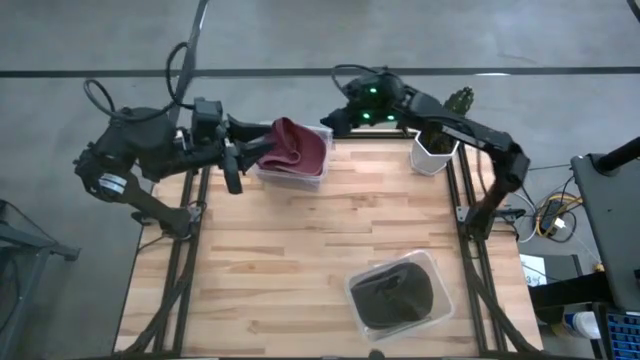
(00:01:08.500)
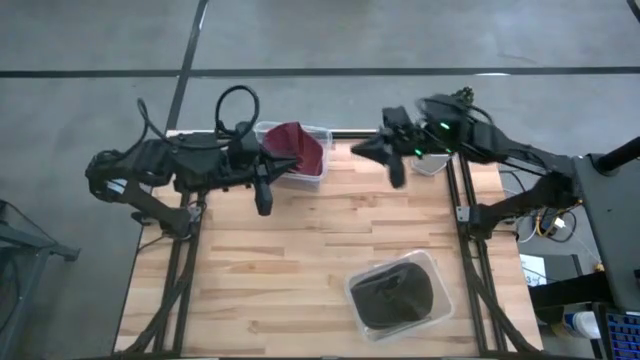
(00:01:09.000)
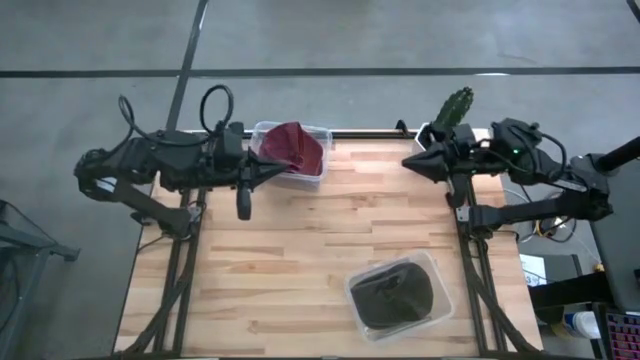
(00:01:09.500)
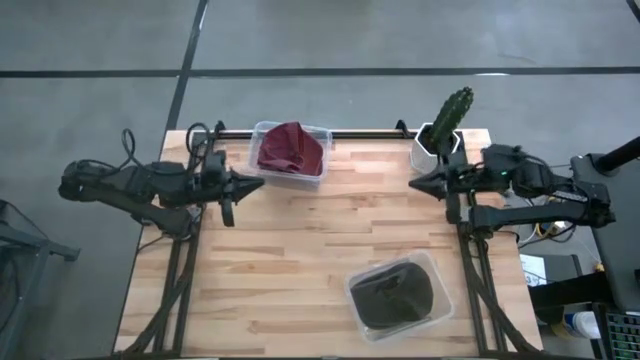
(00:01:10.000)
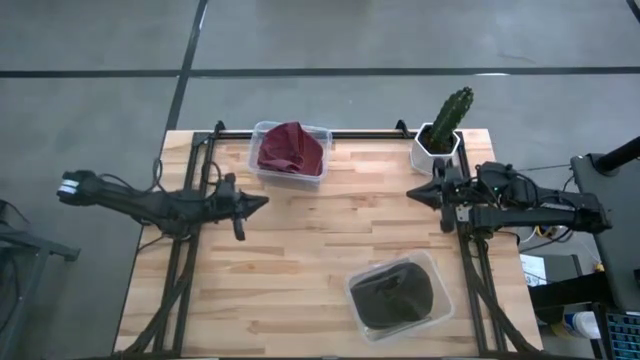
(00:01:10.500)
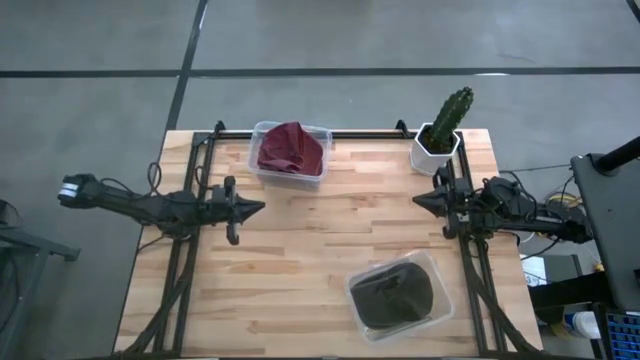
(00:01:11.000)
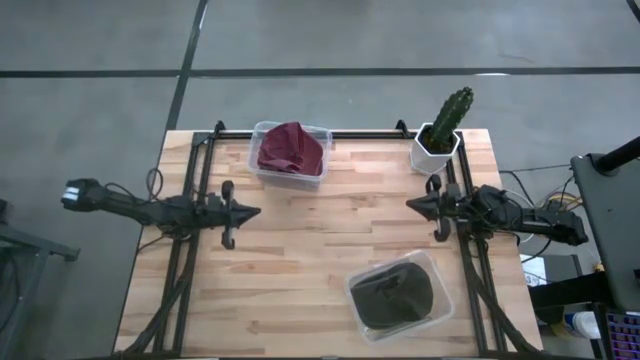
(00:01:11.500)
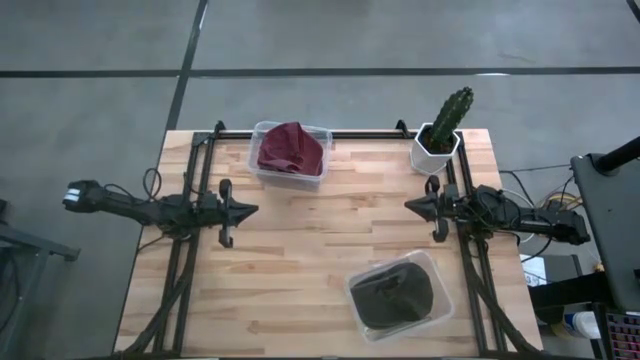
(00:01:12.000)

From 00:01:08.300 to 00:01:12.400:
Task: Pick and place caps into container
Return to Home Position

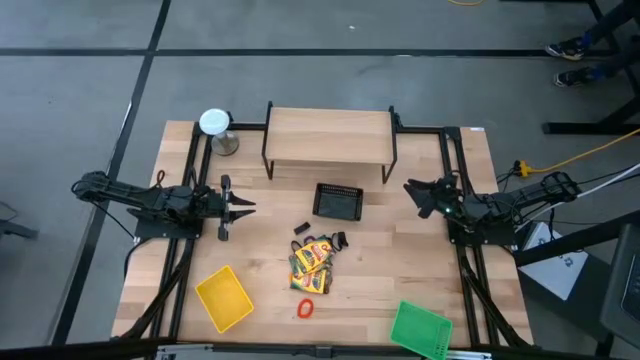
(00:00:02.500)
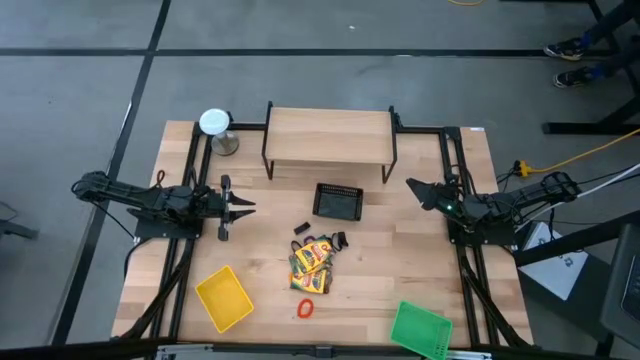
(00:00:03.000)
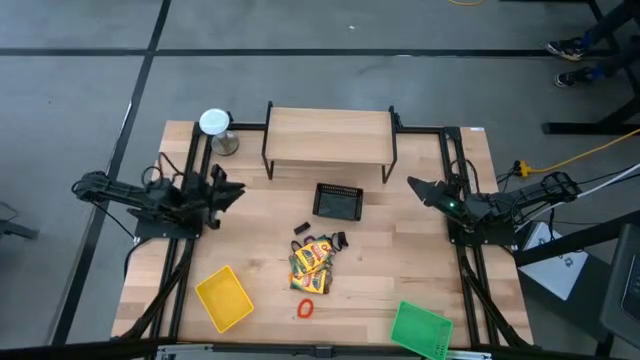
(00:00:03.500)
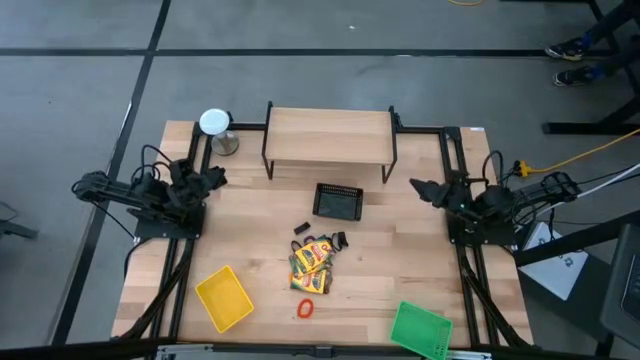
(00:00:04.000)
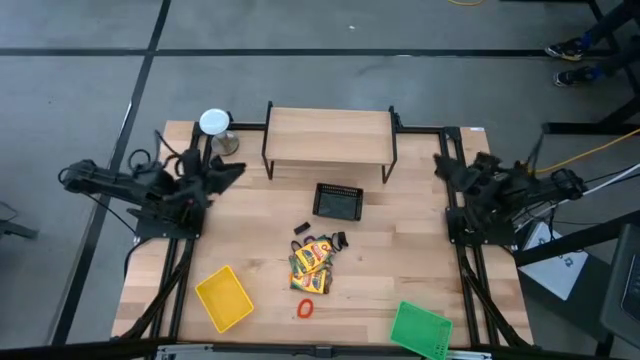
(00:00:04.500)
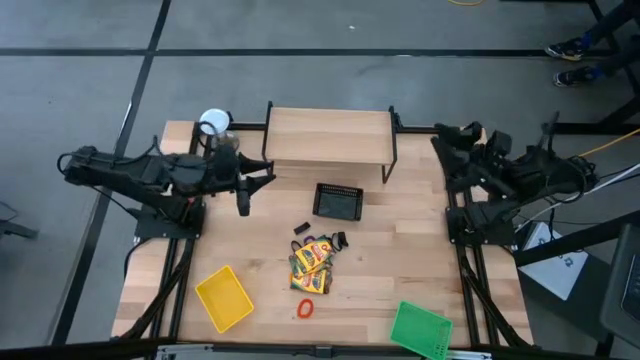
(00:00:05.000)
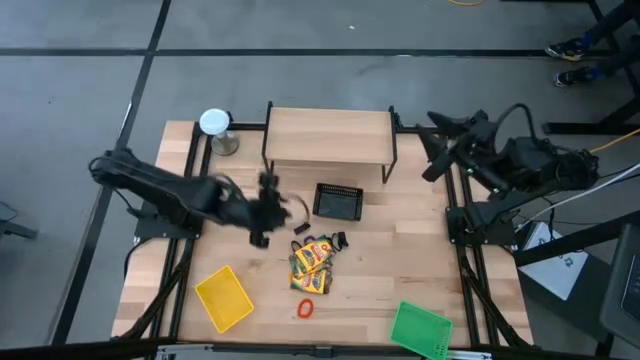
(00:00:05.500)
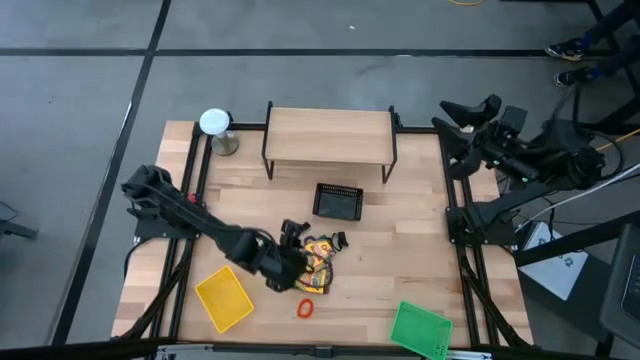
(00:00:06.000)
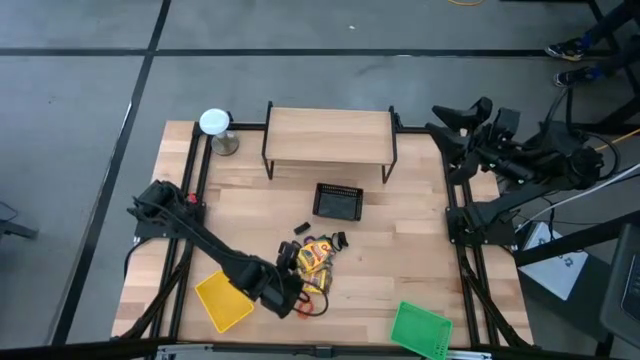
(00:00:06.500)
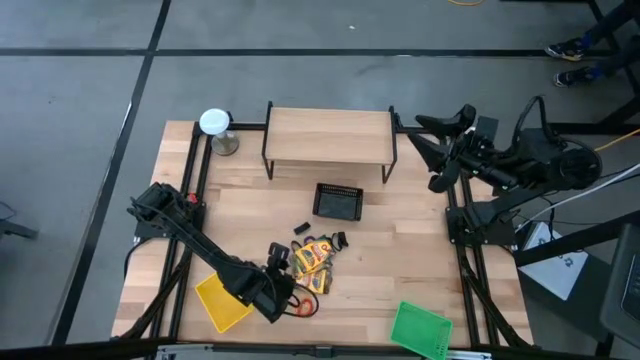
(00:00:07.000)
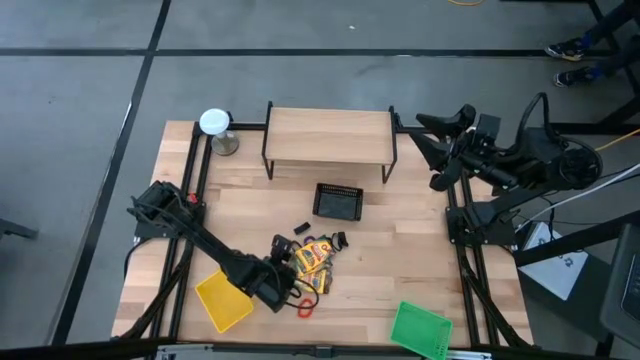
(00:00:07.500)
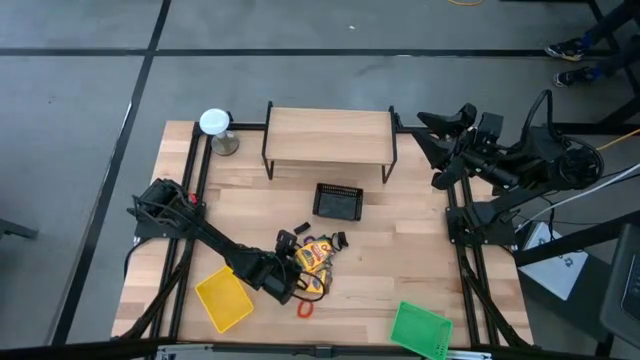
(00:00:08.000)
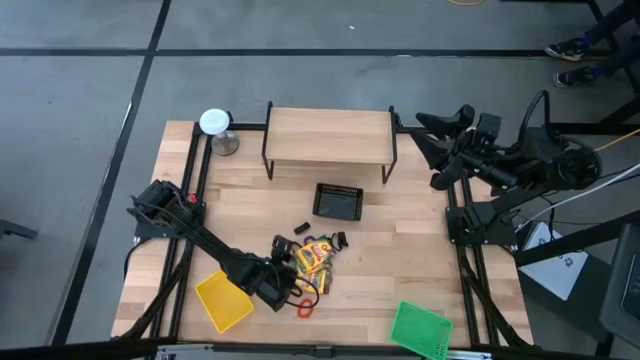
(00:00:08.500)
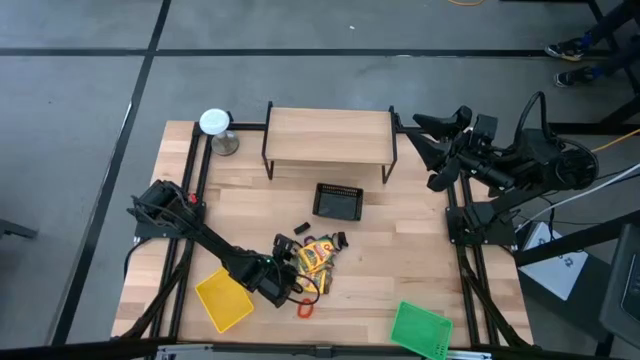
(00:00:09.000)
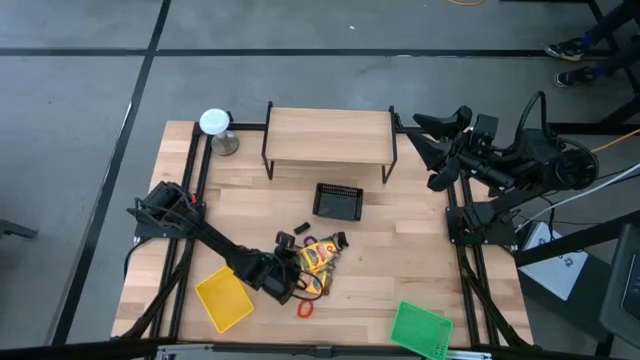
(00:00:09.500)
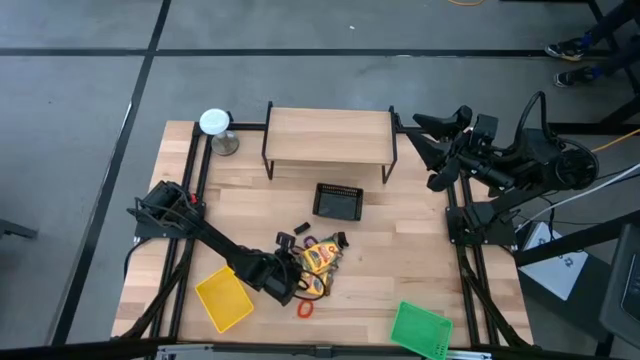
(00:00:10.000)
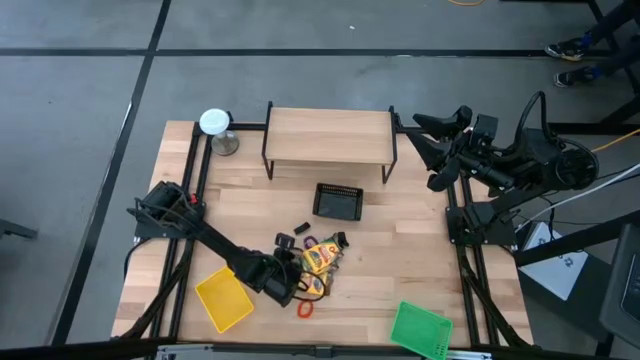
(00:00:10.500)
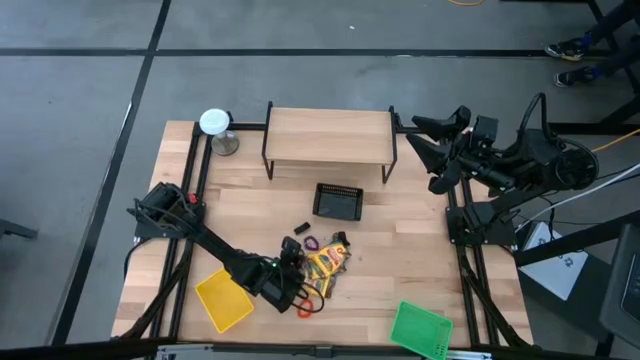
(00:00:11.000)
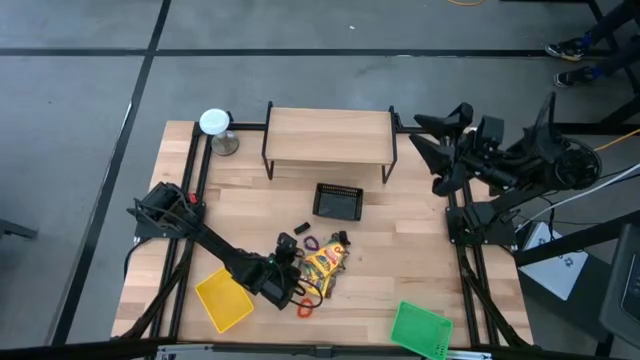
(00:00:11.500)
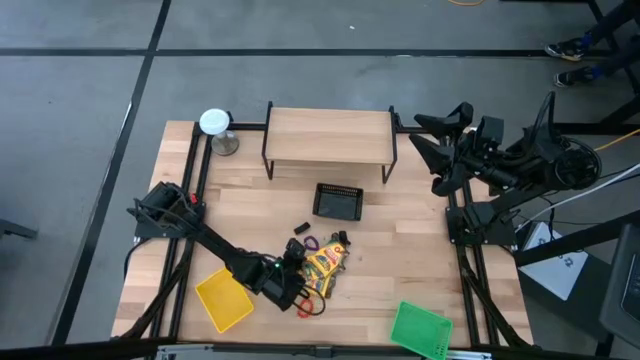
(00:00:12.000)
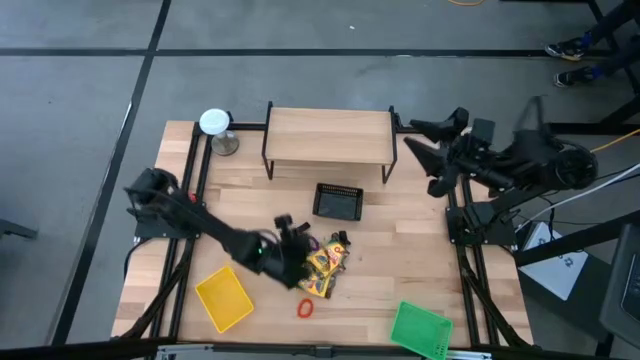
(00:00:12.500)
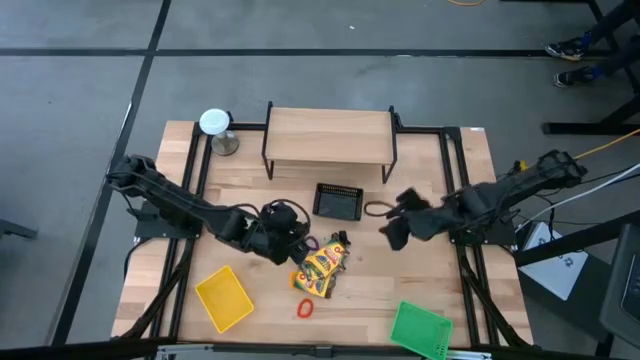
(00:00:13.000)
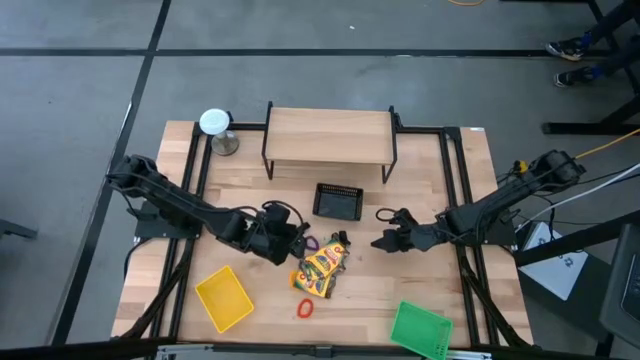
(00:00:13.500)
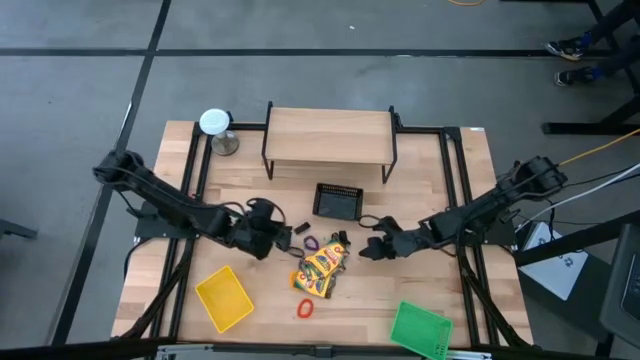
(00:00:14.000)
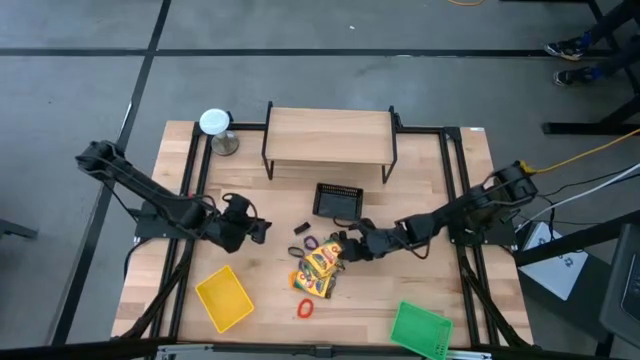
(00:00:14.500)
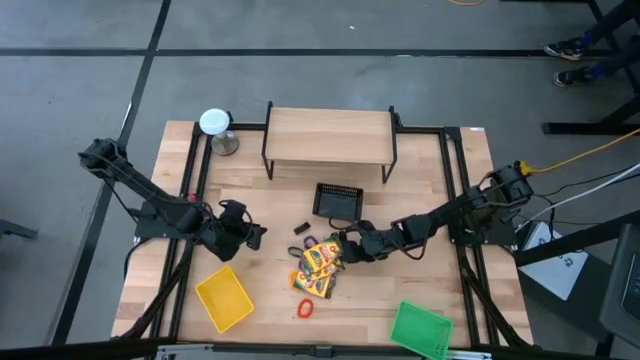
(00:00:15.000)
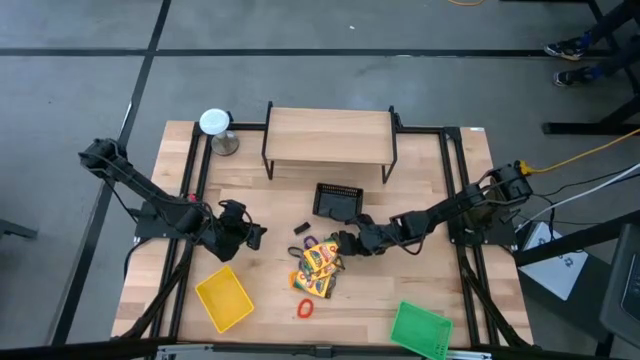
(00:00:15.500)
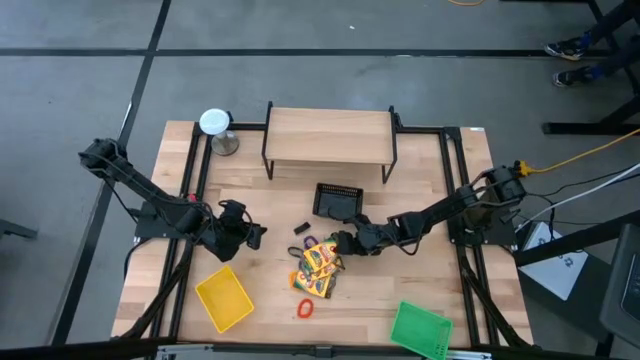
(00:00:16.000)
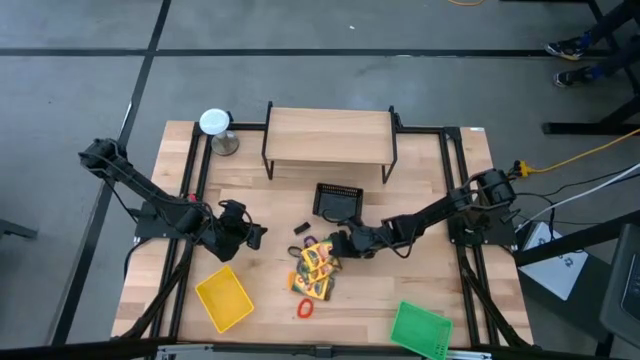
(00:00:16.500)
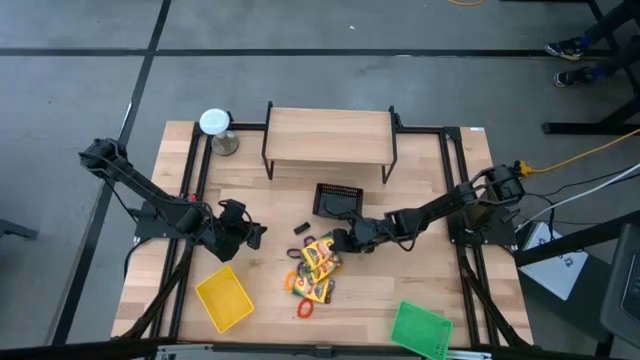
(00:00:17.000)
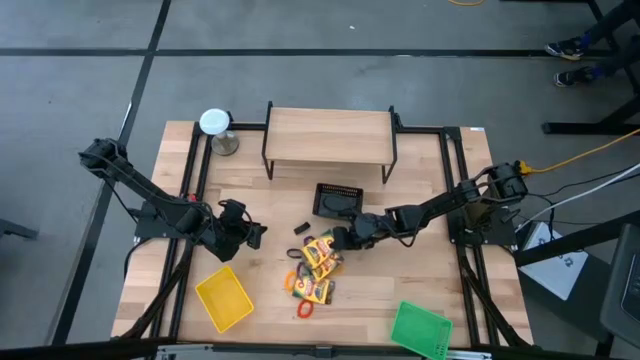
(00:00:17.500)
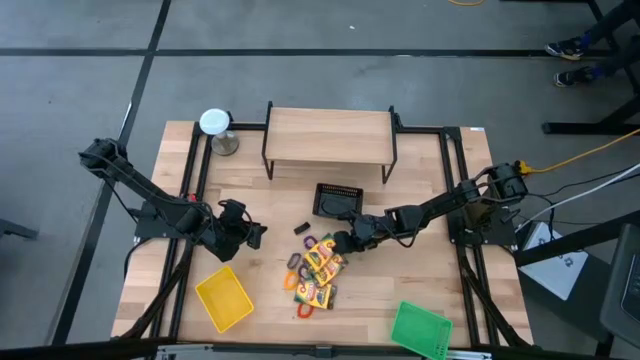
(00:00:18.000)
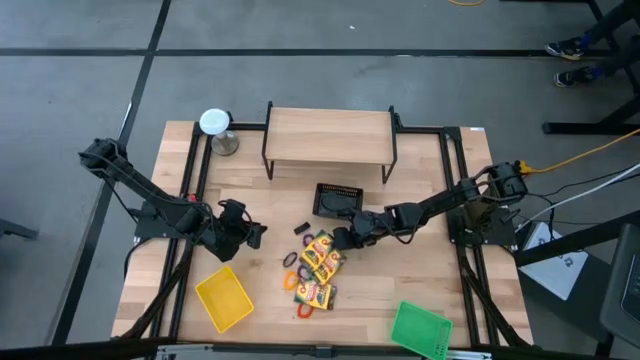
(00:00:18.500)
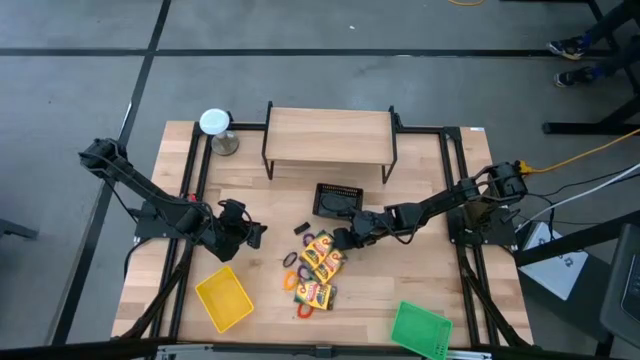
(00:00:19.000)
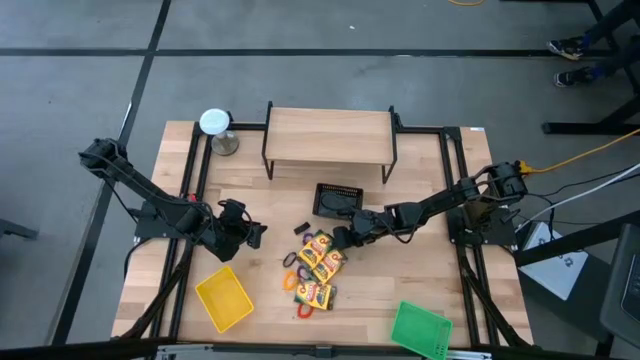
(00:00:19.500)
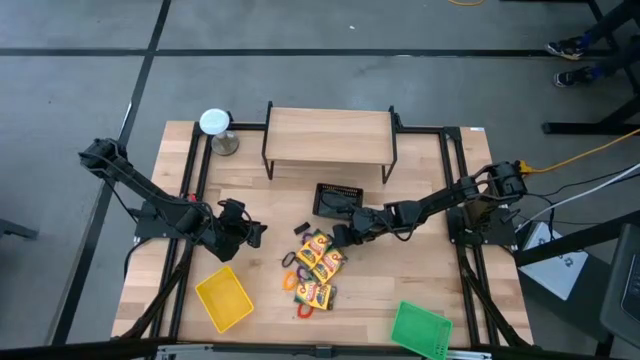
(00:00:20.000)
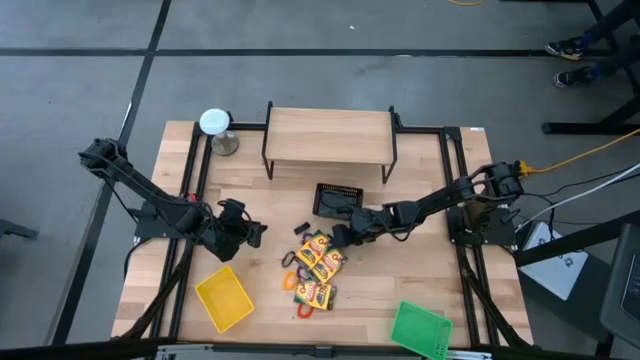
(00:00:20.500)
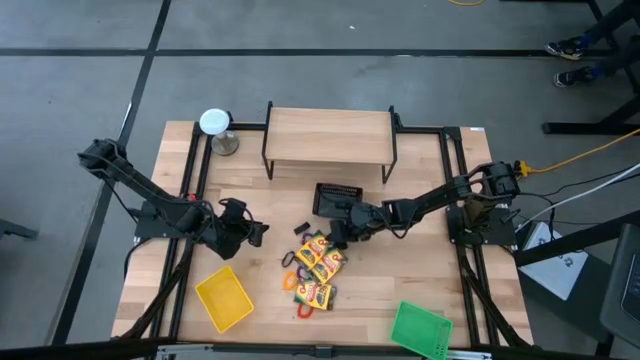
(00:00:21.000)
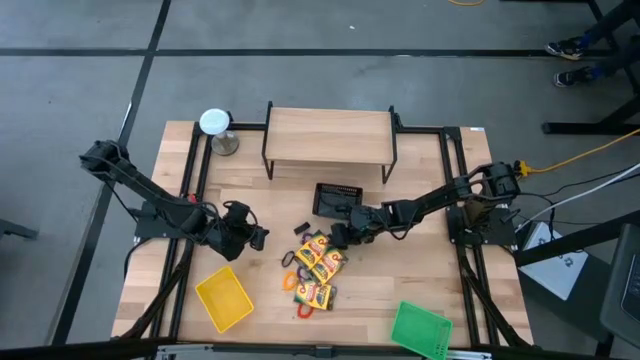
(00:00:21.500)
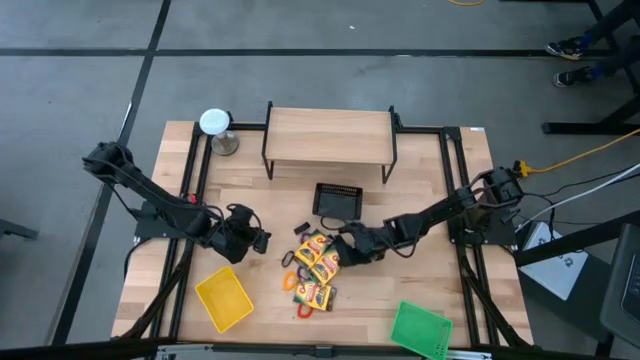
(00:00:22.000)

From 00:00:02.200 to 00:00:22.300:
Task: Pick & Place Office Desk Supplies
Put the top crayon box into the green basket
